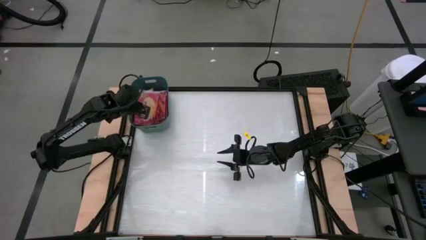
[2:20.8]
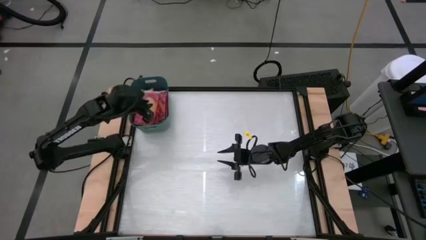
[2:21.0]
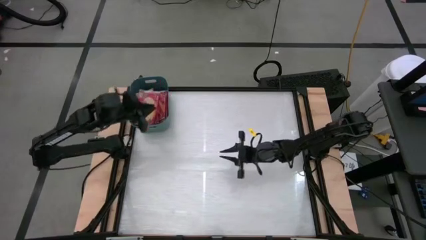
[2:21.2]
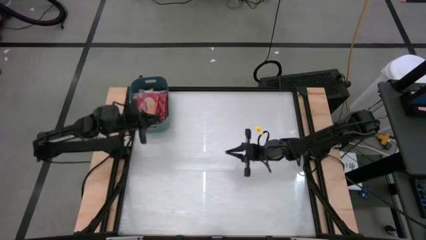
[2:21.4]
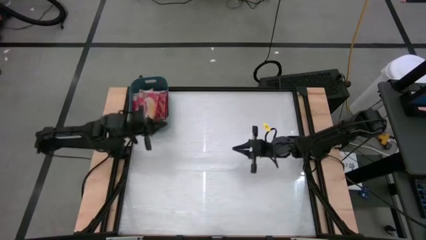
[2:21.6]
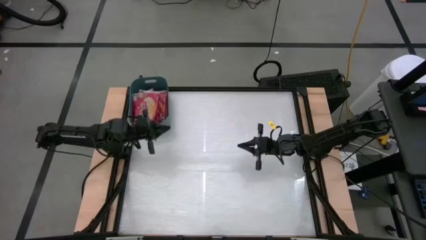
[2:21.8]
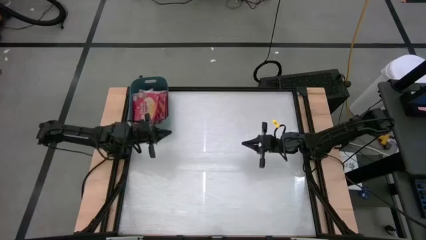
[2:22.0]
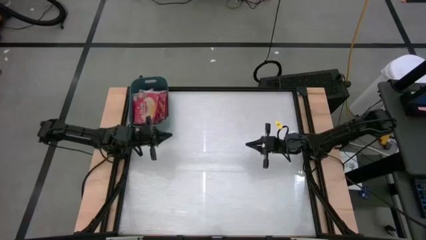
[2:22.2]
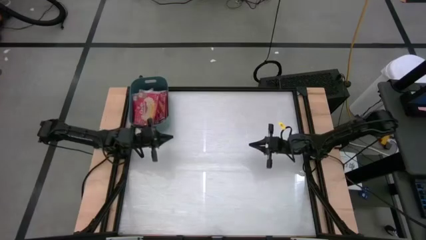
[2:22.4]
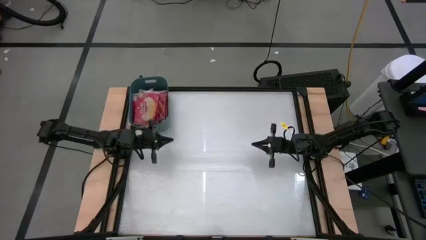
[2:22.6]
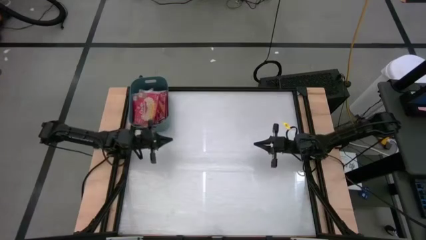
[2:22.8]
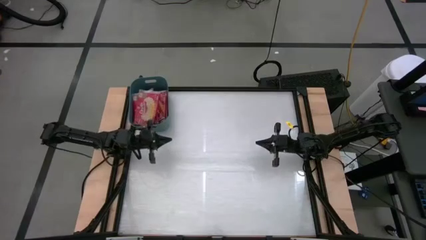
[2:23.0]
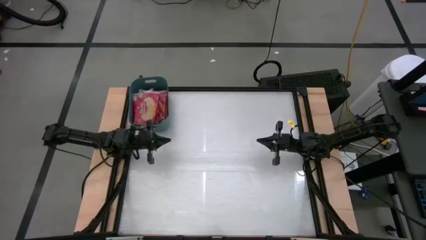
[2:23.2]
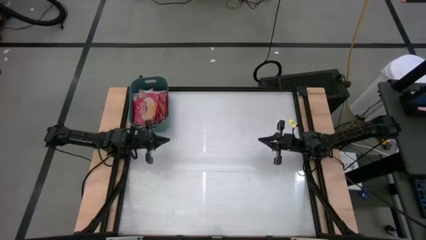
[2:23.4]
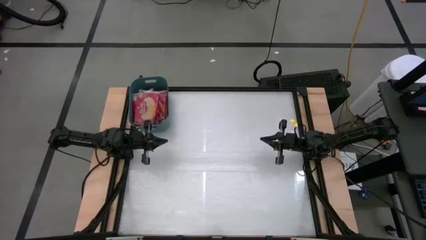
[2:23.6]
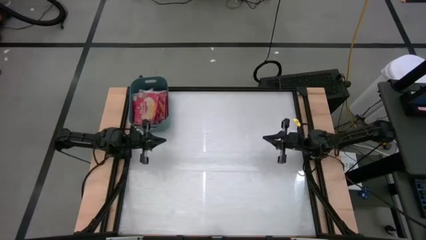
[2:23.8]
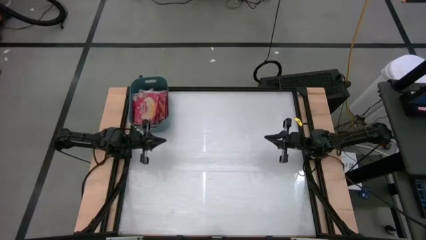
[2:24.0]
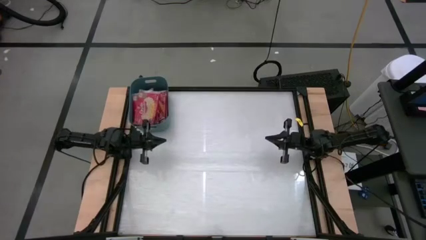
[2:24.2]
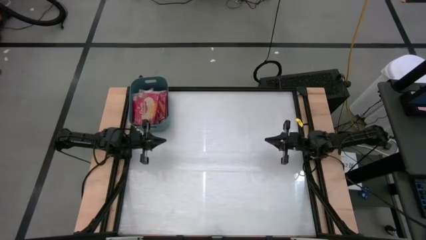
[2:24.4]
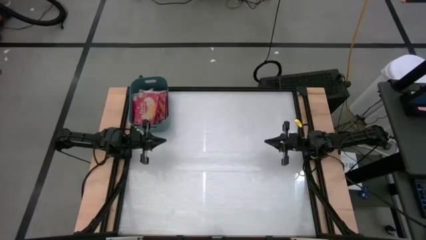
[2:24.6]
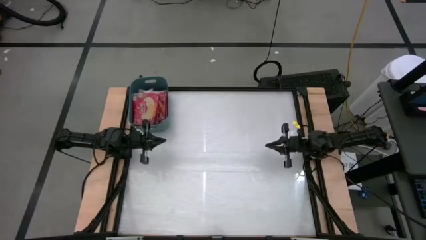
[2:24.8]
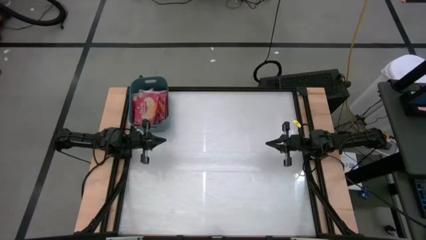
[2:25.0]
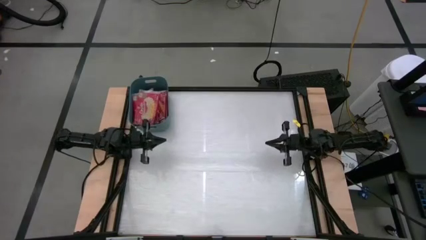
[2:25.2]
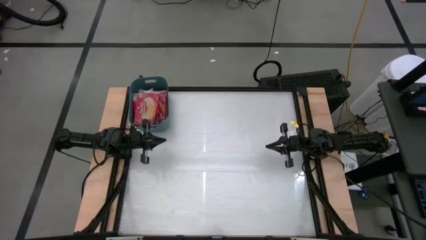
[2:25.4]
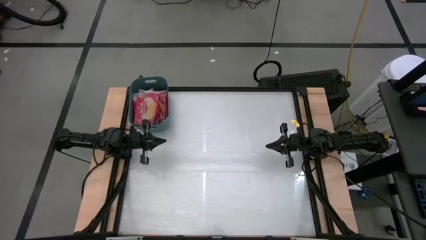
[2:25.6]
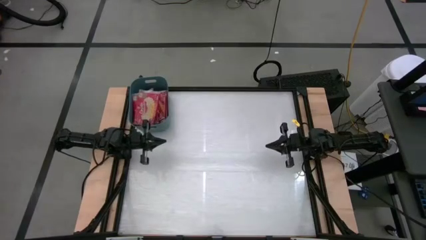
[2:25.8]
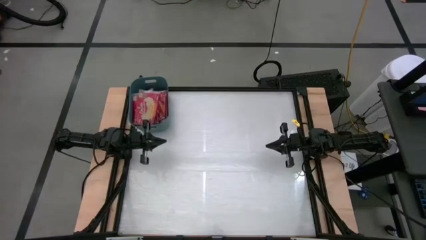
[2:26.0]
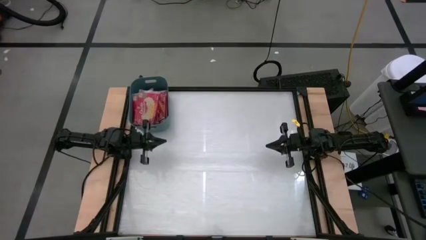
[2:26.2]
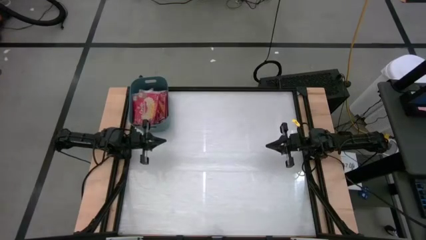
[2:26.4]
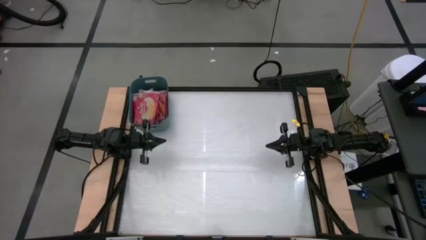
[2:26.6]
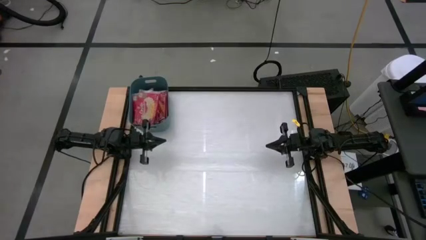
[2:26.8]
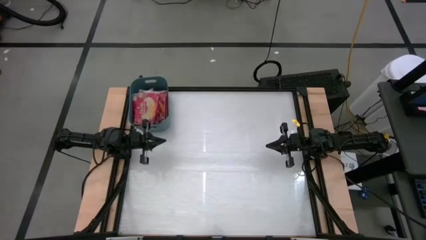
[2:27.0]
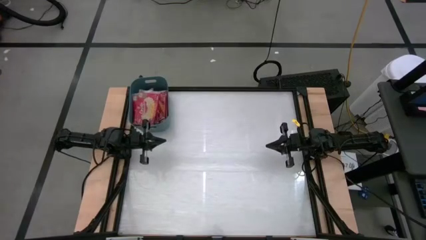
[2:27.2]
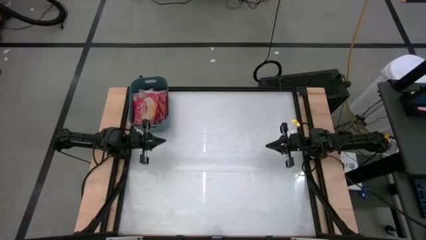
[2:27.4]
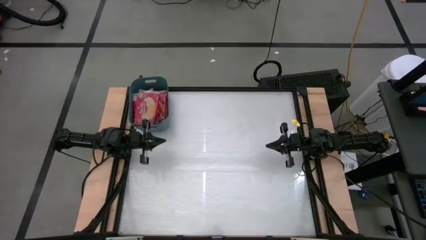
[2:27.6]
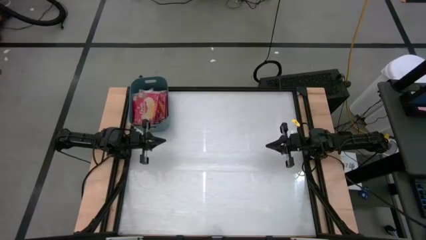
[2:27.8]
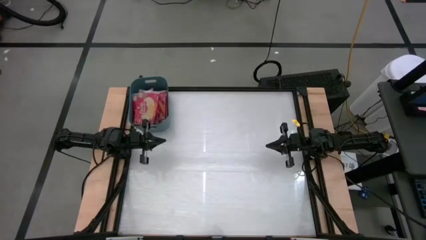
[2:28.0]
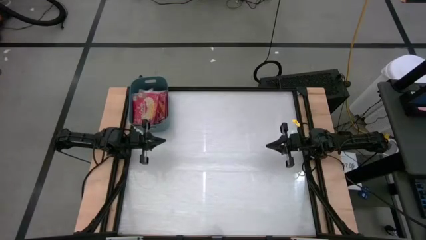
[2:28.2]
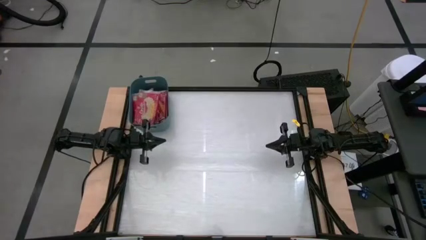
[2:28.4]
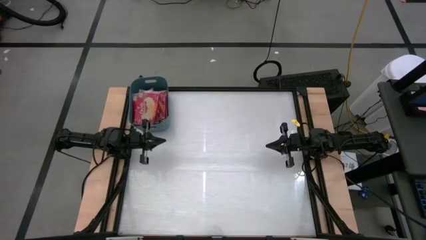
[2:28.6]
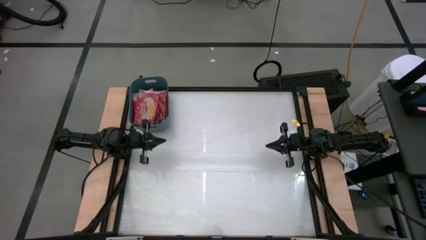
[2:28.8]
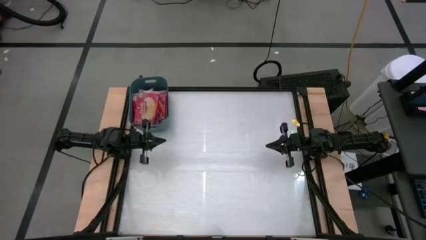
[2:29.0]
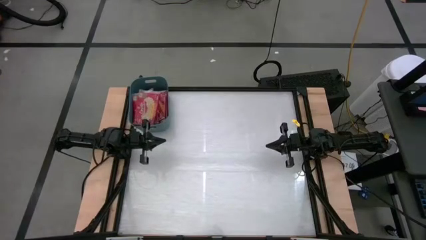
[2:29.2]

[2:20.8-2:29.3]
Task: Sort popcorn bags into baskets
Return to Home Position

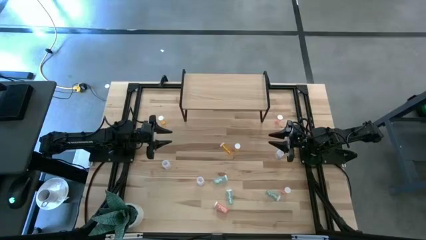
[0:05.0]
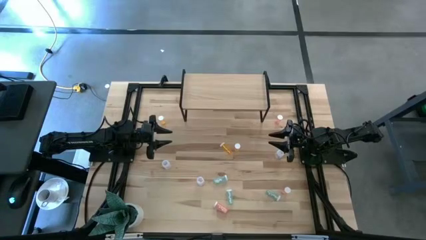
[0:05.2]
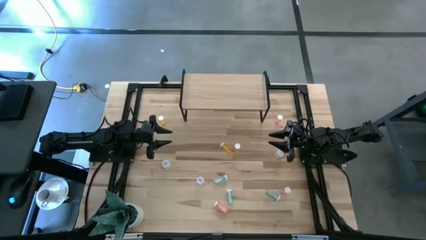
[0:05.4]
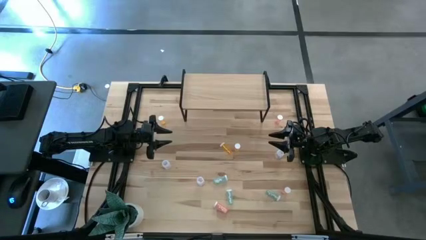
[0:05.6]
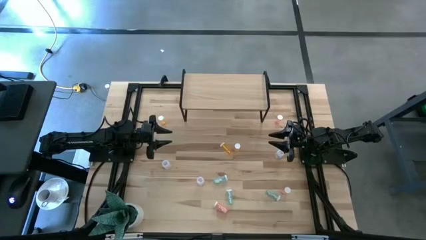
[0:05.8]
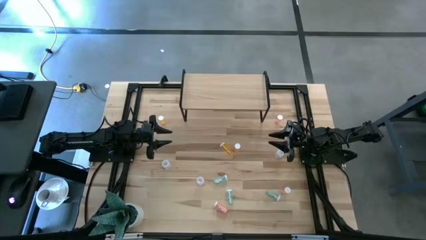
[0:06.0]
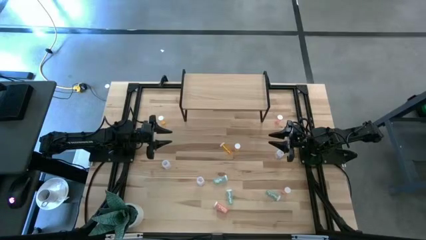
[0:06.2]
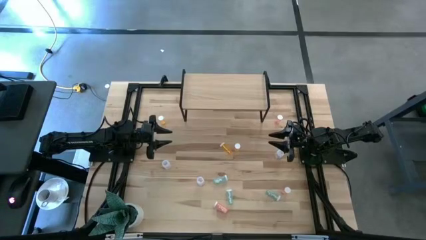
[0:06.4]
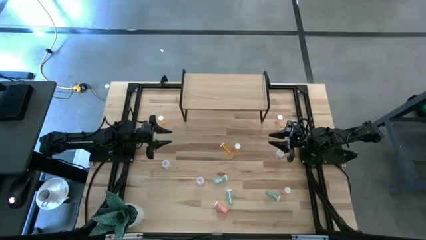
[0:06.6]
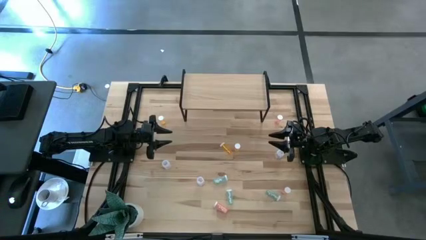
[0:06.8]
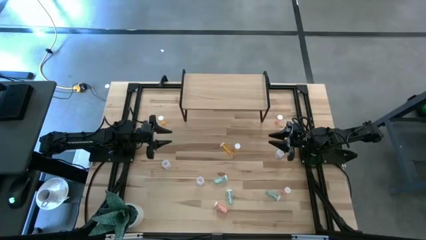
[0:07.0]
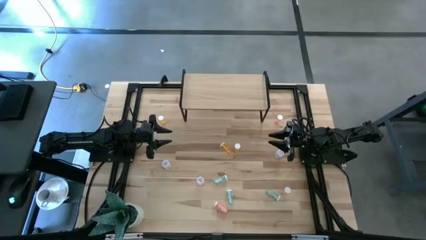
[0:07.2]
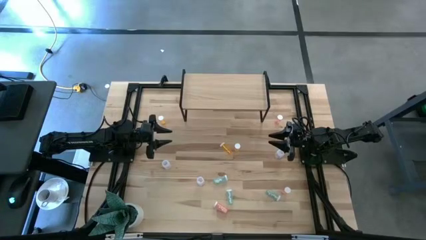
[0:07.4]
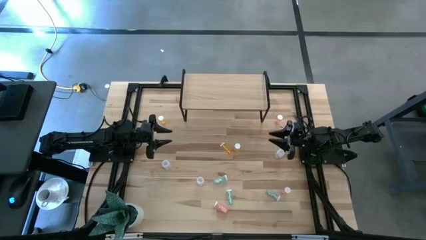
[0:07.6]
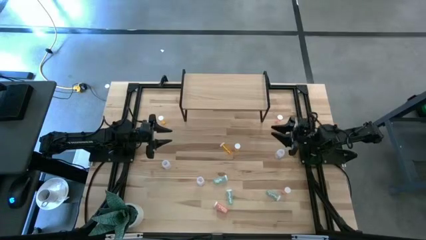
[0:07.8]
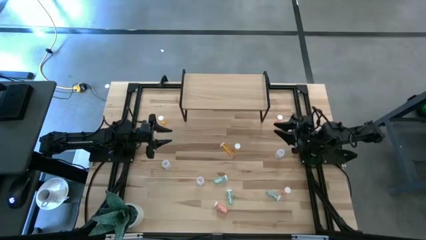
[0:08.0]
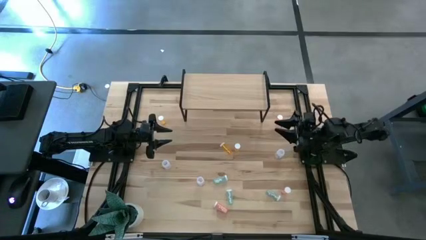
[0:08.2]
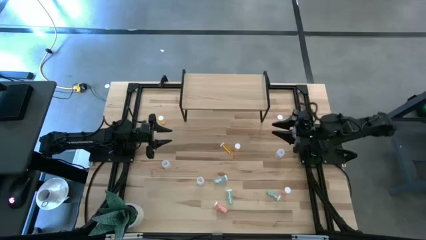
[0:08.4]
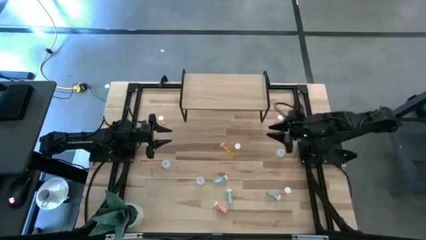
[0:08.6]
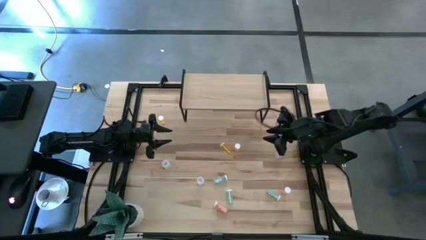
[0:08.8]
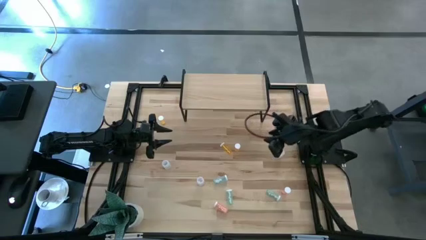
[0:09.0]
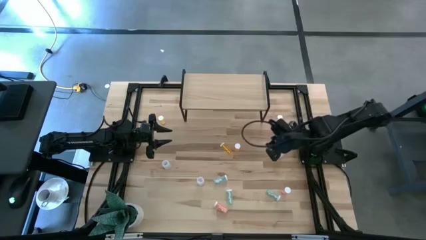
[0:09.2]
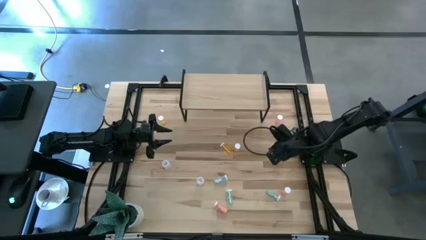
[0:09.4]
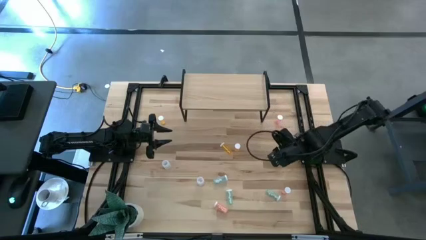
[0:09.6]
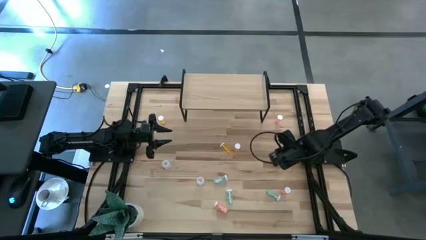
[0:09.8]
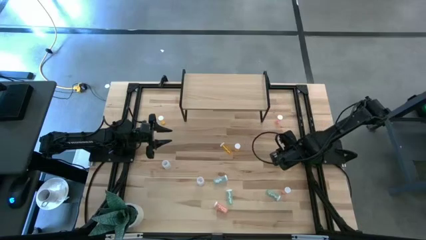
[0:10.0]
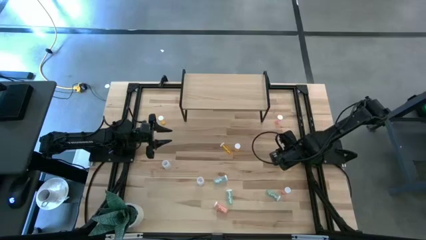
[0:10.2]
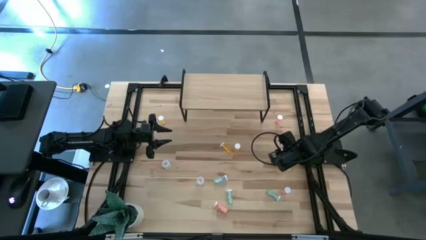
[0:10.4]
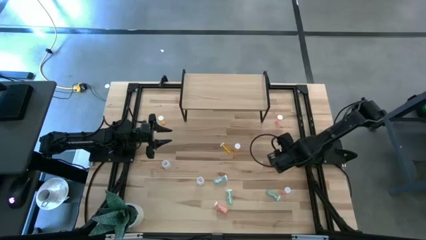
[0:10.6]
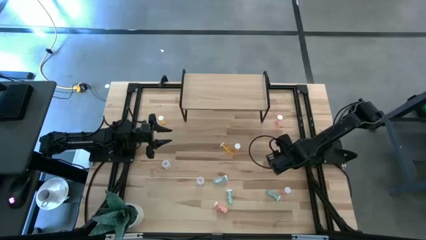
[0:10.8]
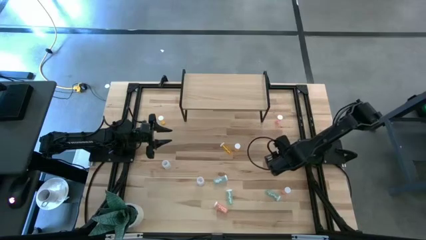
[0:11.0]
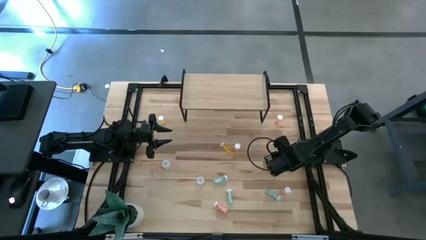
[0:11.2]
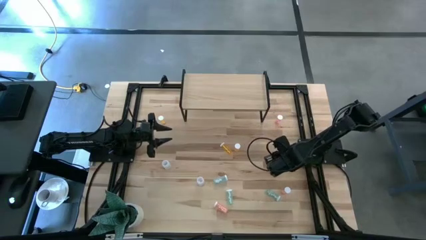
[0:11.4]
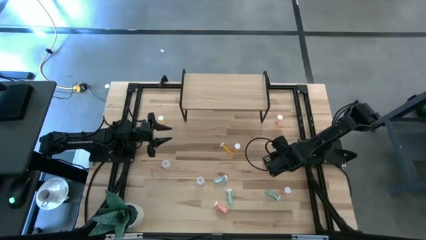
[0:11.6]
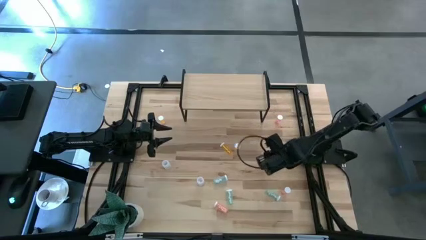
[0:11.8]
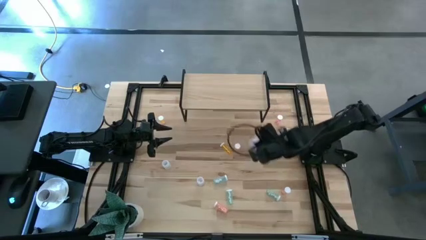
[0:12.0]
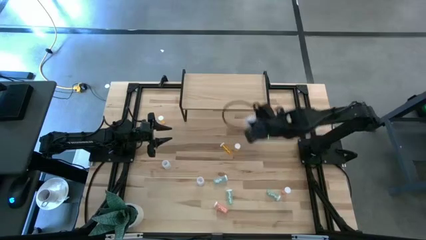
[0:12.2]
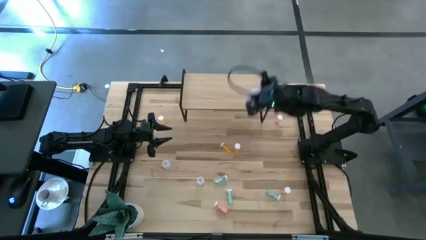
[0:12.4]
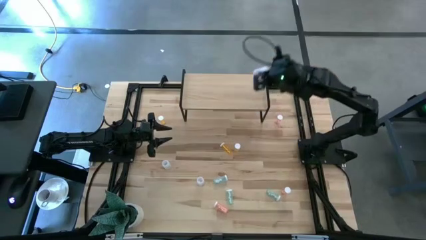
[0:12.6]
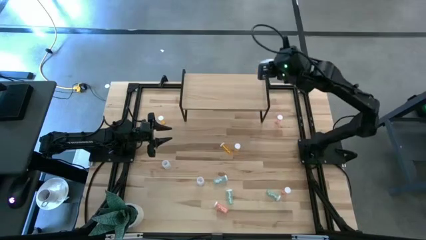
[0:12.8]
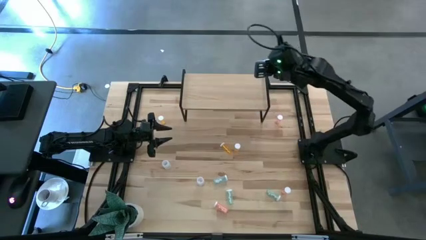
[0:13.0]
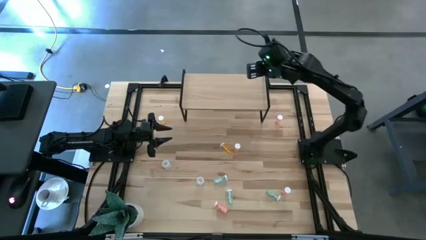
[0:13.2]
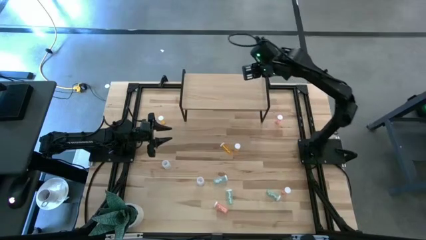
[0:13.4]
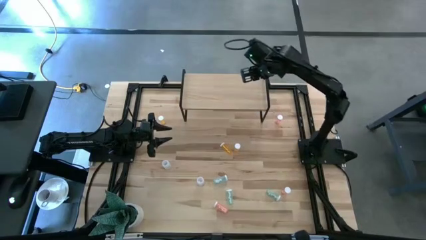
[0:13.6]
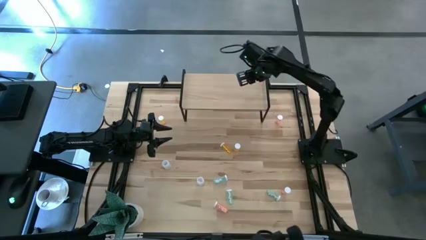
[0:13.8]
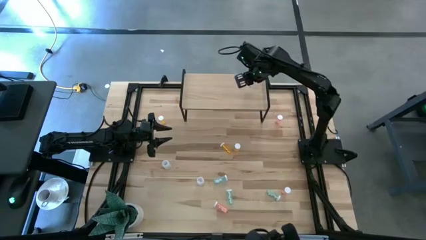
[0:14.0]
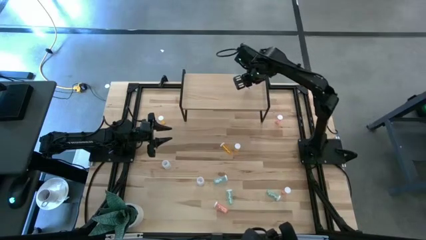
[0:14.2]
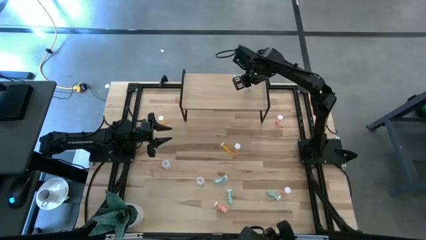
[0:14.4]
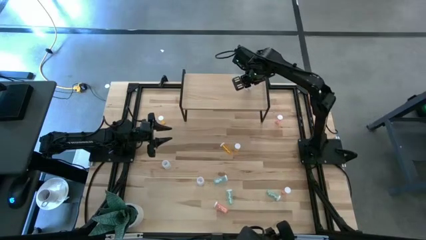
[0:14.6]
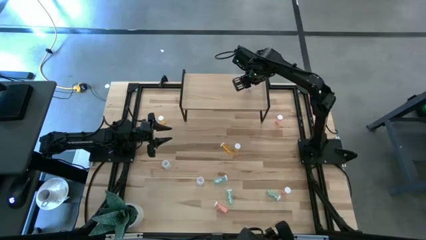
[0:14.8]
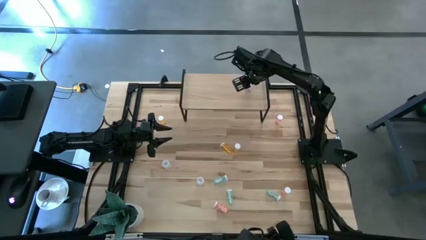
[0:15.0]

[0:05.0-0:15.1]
Task: Pick and place medicine bottles onto shelf by color
Put the transparent pill bottle on the shelf
